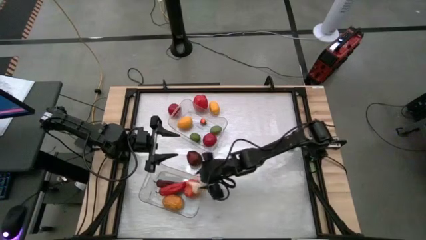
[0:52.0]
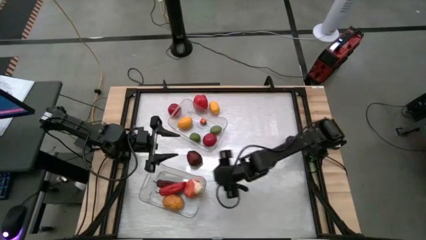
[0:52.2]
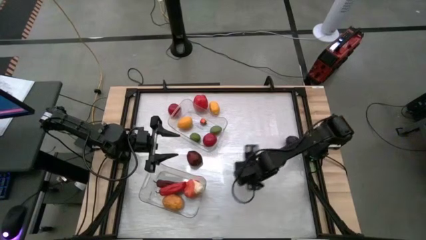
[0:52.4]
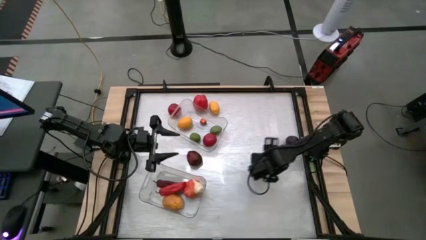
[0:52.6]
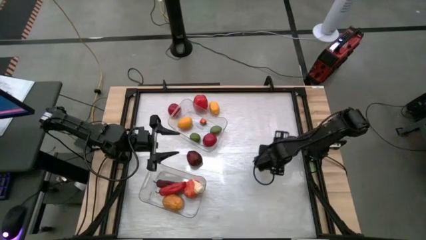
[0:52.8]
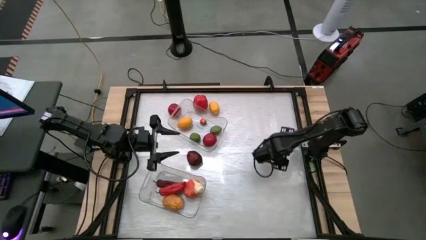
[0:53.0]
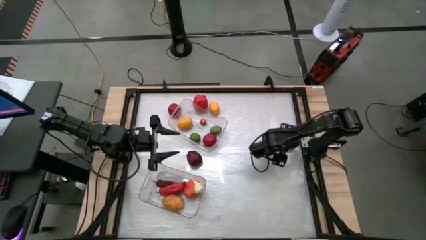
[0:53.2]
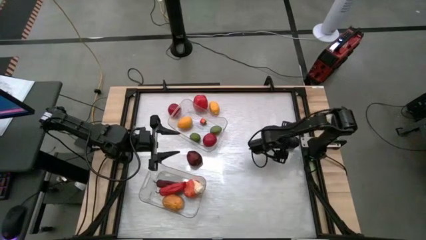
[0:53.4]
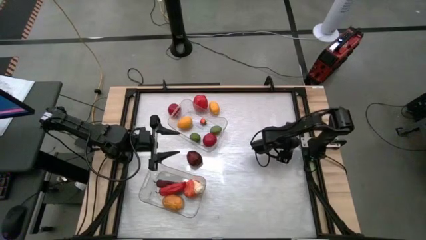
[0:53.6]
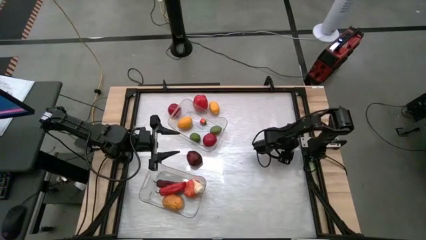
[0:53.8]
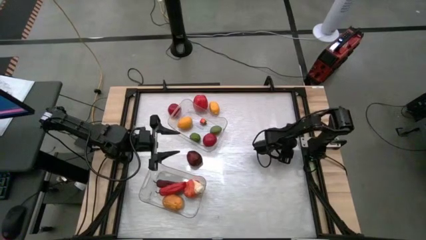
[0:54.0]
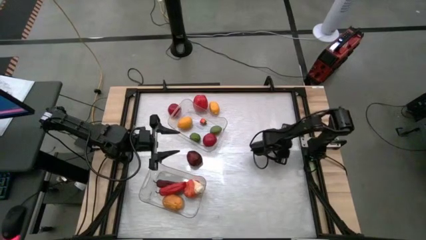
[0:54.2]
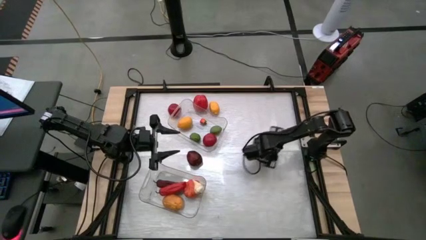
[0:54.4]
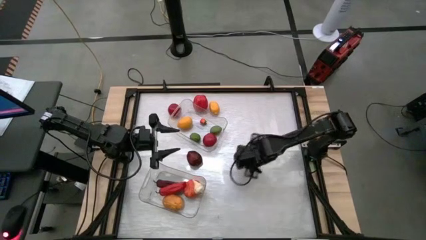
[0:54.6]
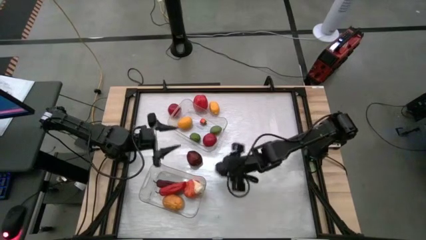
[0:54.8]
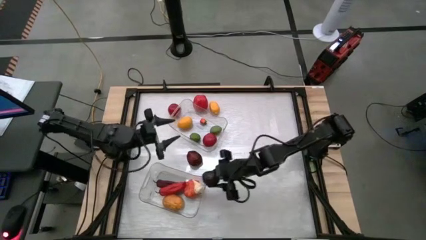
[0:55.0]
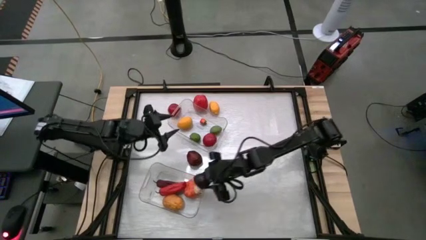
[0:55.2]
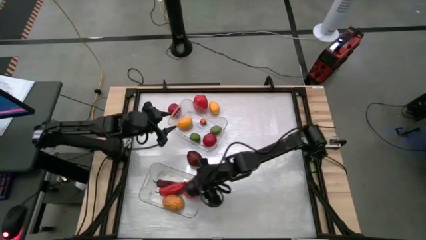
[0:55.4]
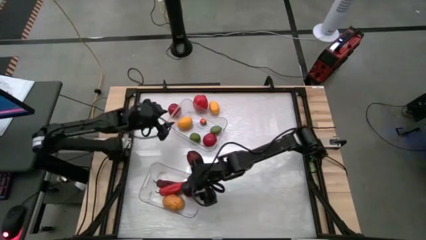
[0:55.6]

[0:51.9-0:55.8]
Task: Sort produce into baskets
Put the onion into the bottom transparent bin

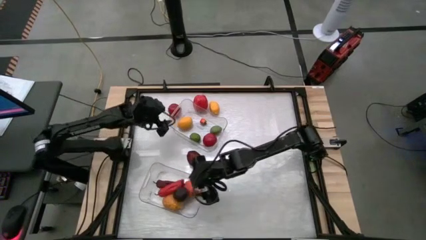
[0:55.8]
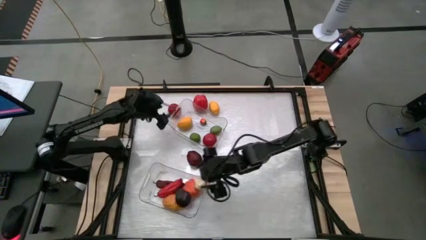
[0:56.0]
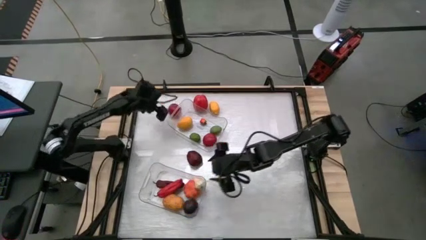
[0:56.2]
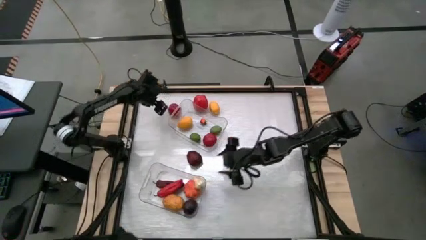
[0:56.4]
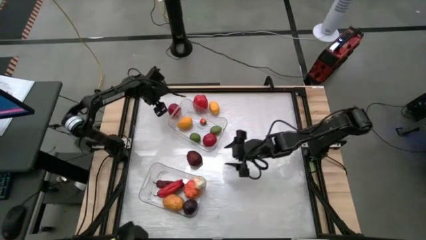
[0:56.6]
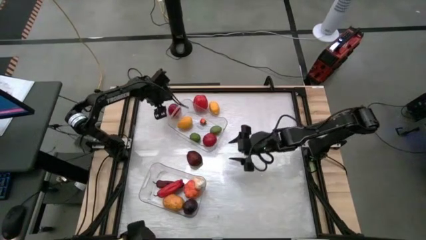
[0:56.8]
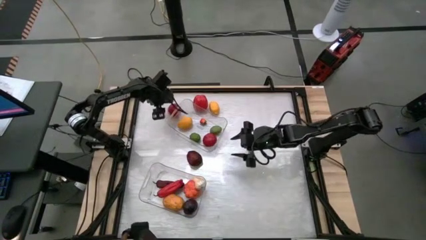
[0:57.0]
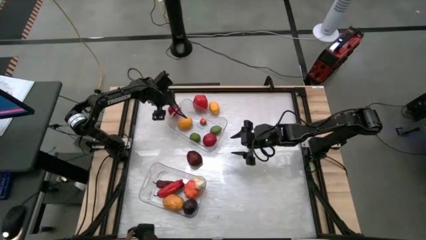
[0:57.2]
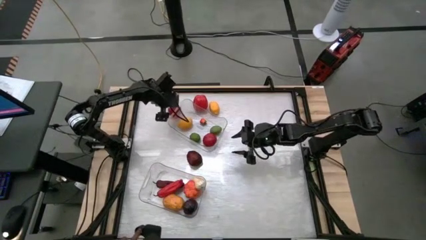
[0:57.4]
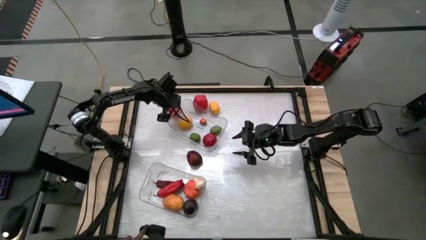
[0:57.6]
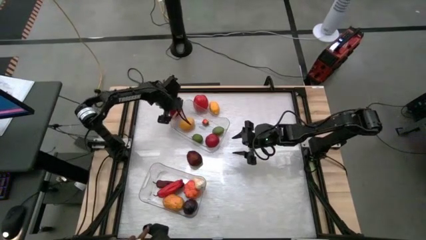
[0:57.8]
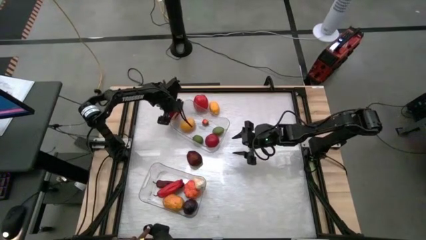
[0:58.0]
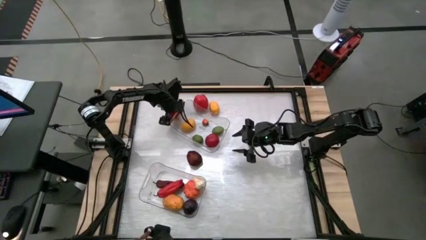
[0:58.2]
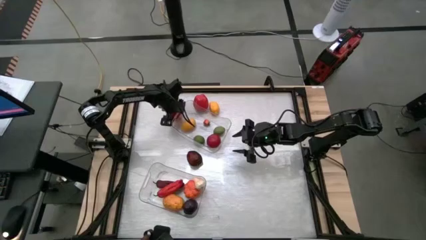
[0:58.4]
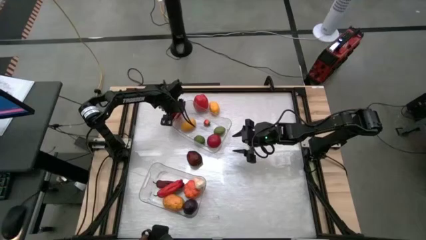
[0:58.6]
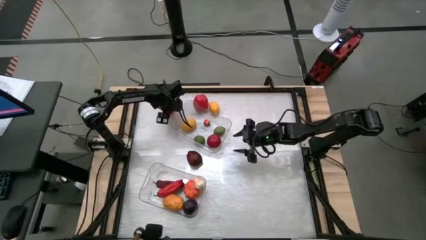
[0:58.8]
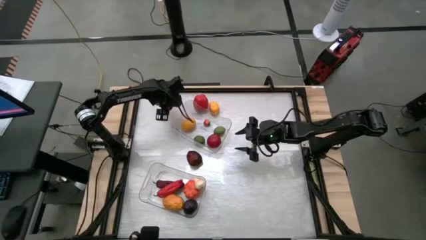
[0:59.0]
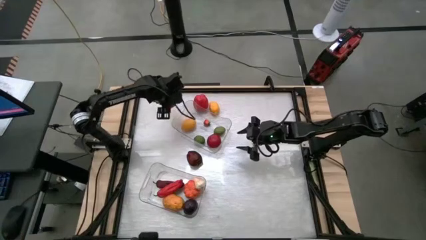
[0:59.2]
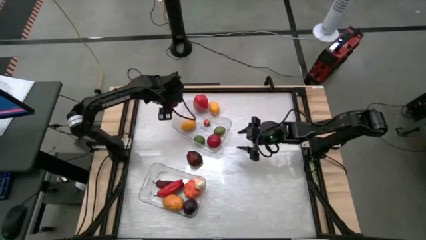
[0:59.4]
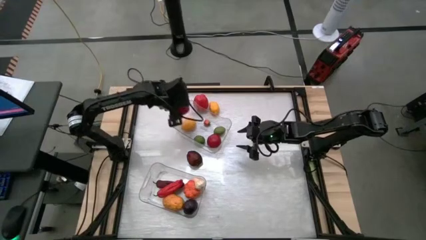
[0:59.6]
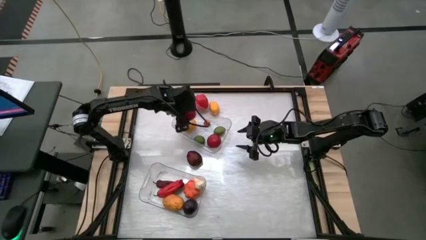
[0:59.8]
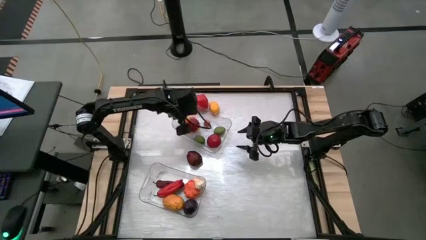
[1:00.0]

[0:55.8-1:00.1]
Put the red tomato into the top transparent bin

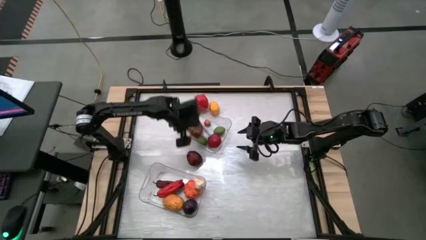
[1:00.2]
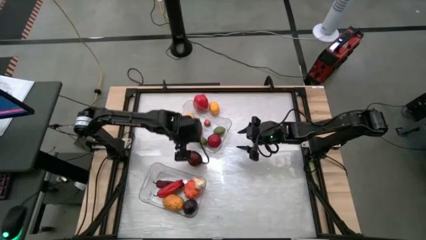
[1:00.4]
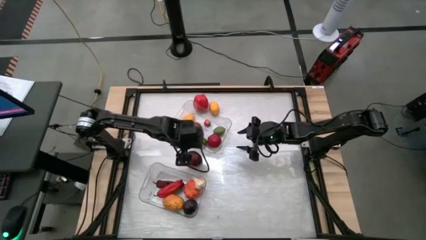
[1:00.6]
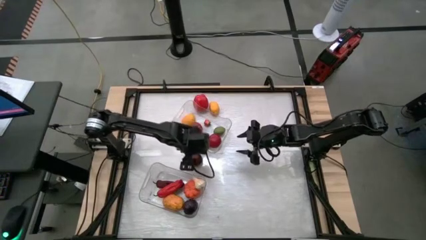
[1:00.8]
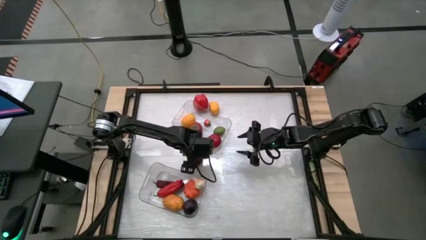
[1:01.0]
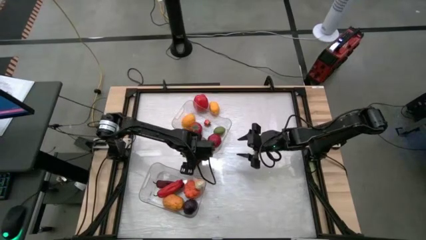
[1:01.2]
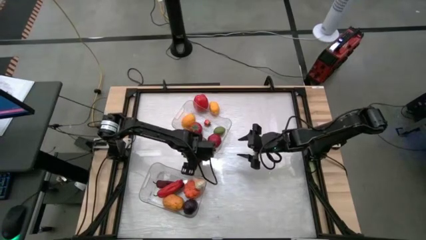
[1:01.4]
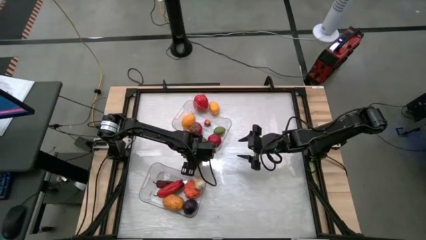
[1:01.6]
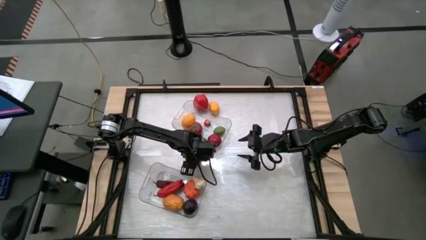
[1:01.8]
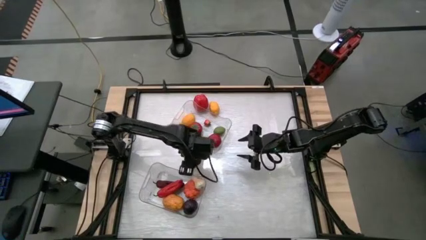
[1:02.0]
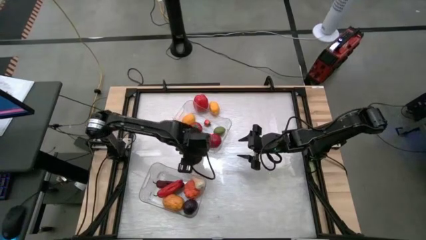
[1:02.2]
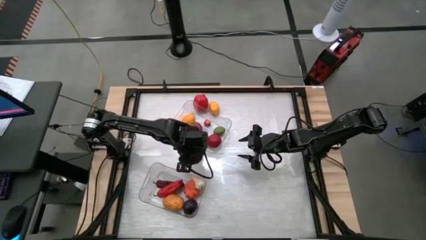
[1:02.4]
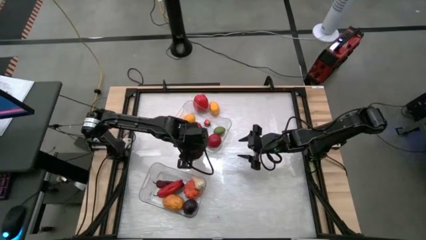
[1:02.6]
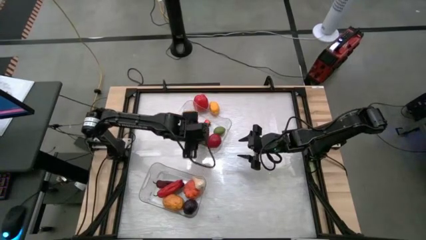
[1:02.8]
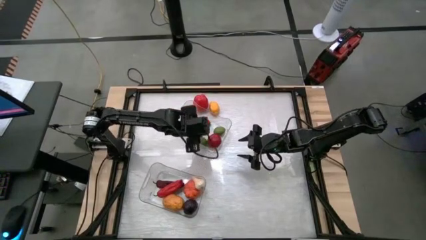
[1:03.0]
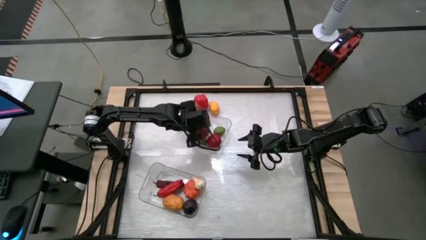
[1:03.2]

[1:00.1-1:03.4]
Put the apple into the top transparent bin

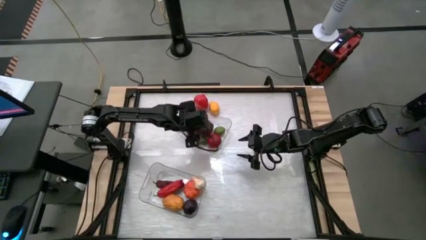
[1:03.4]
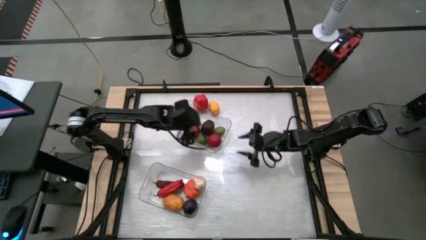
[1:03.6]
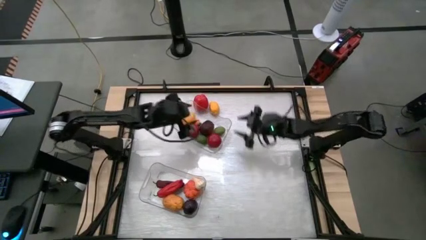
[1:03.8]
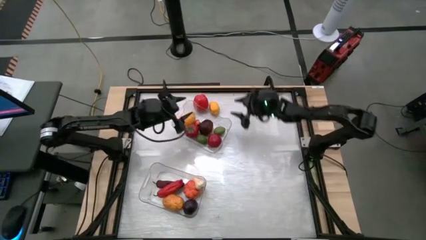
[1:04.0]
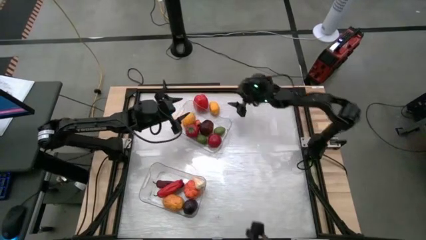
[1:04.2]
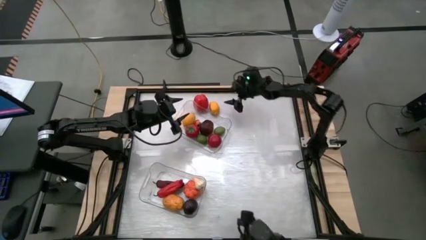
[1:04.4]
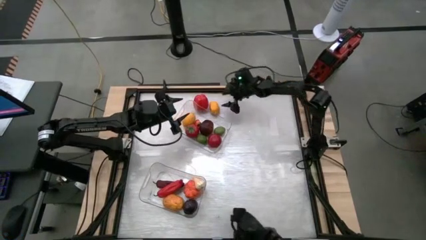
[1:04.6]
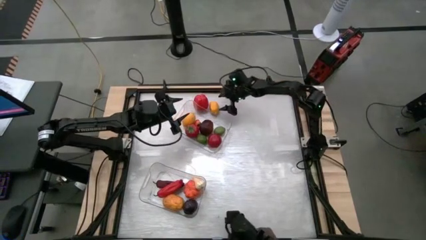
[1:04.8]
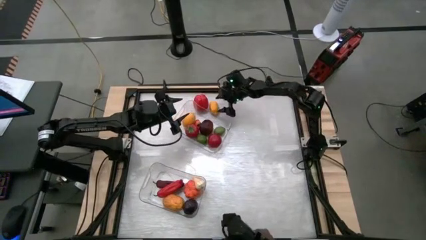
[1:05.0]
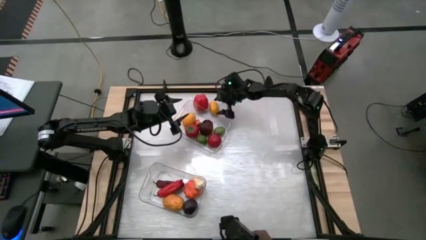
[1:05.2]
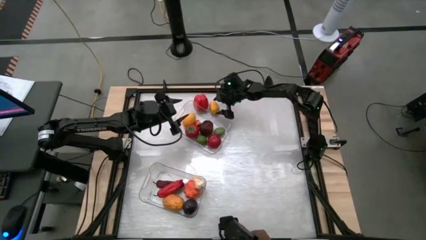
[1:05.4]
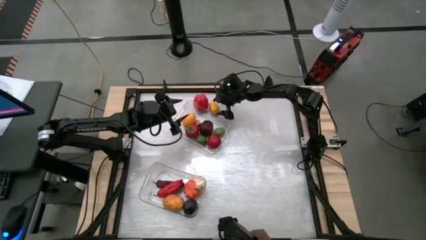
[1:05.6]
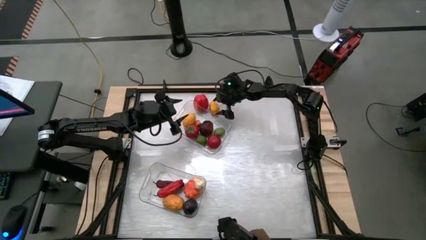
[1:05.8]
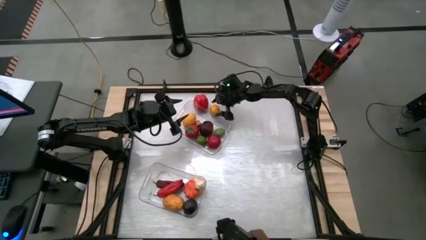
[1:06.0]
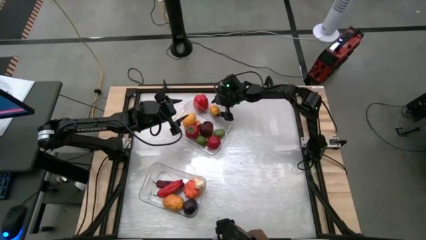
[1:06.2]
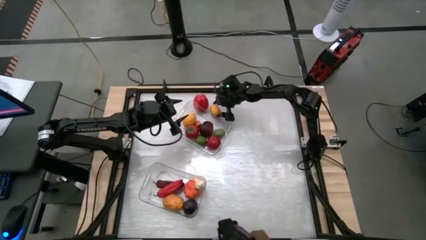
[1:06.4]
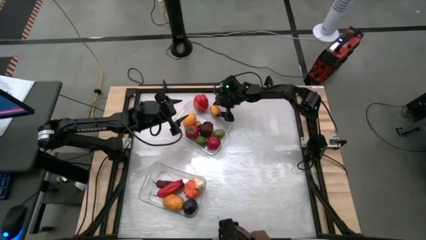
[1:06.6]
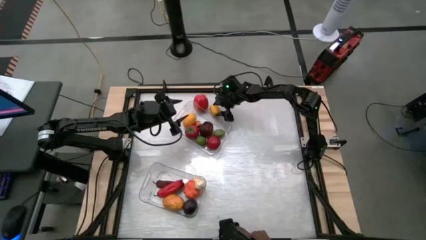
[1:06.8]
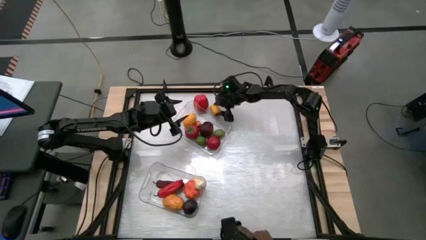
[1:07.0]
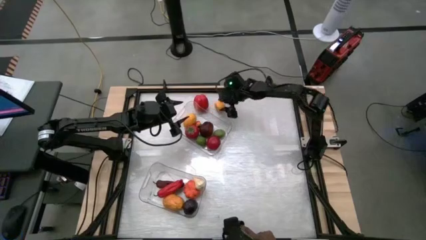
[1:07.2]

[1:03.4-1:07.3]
Put the lemon into the top transparent bin

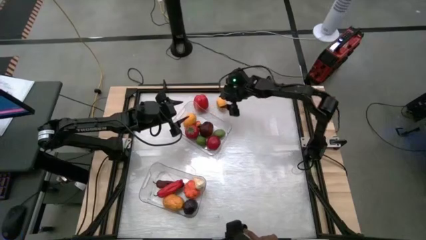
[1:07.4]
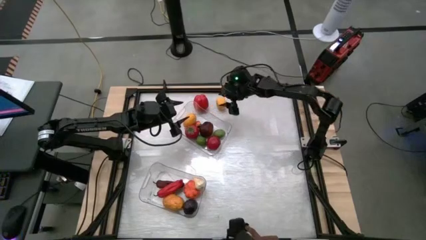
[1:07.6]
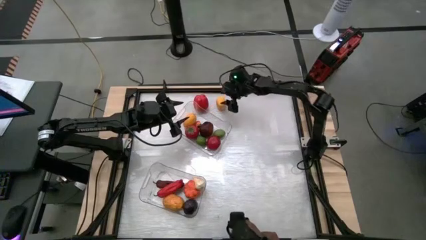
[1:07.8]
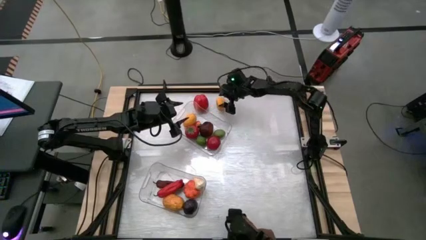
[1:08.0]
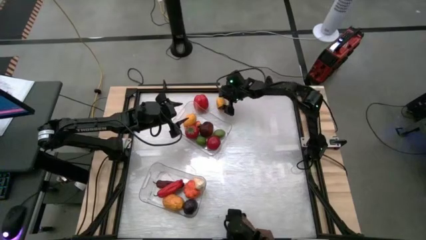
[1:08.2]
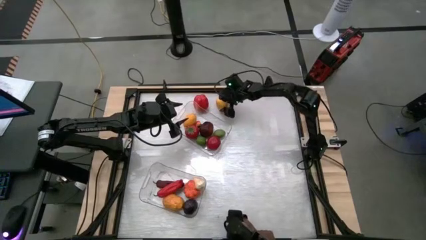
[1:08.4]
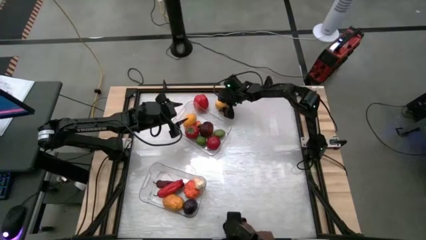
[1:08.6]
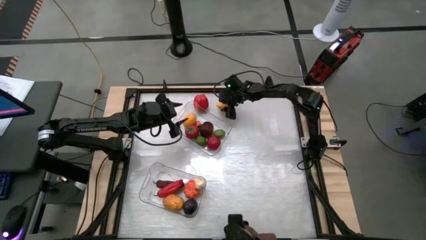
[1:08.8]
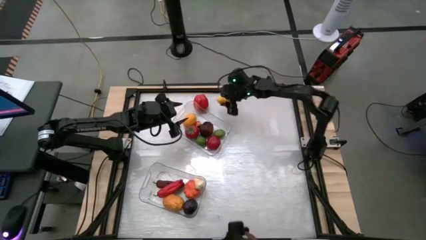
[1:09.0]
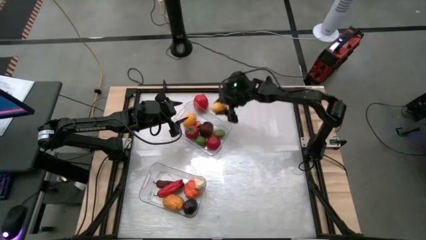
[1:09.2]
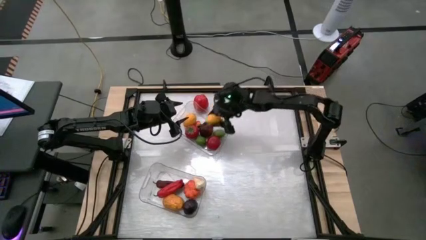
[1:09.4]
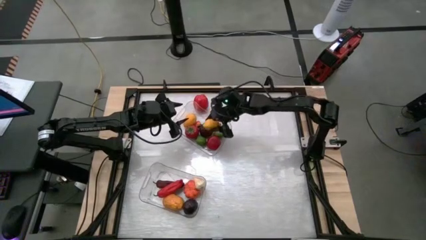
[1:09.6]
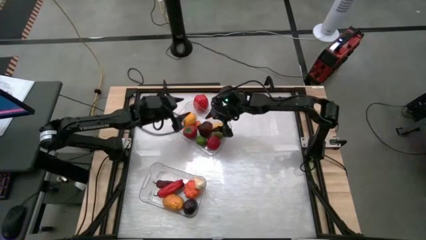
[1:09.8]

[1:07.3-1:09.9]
Put the lemon into the top transparent bin
